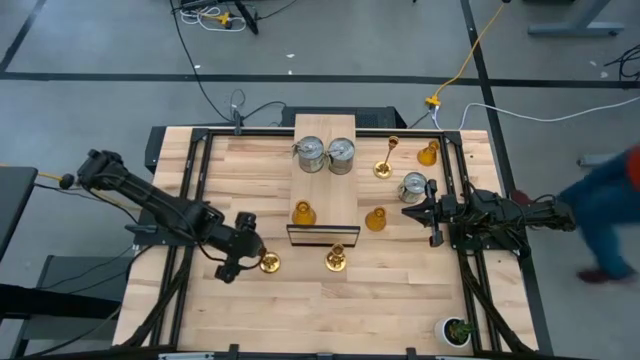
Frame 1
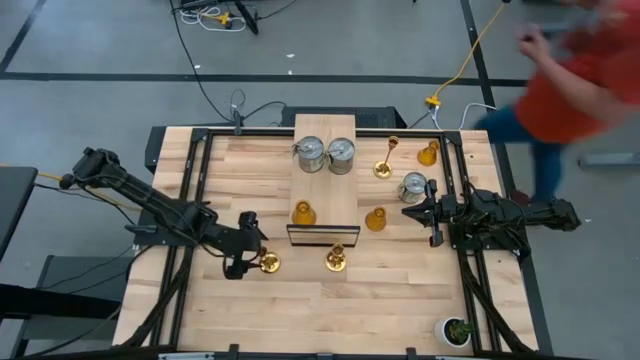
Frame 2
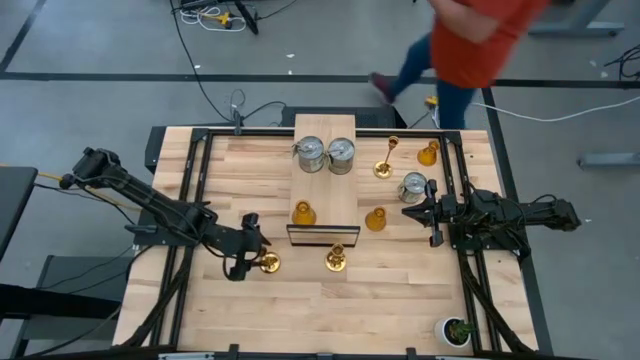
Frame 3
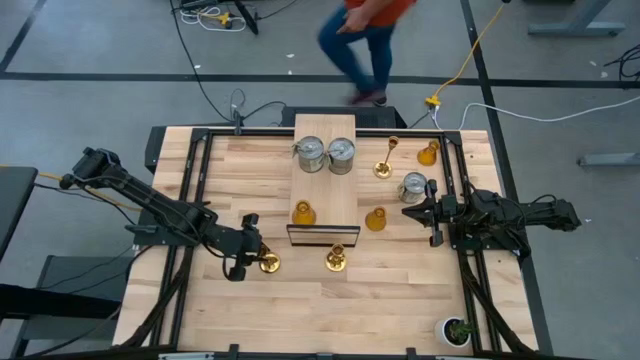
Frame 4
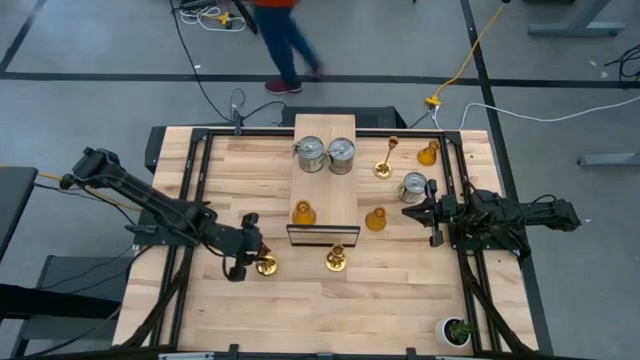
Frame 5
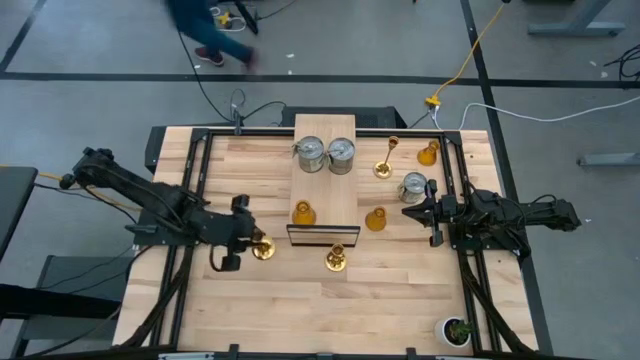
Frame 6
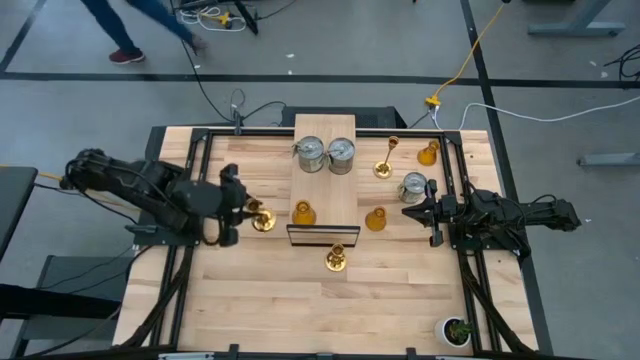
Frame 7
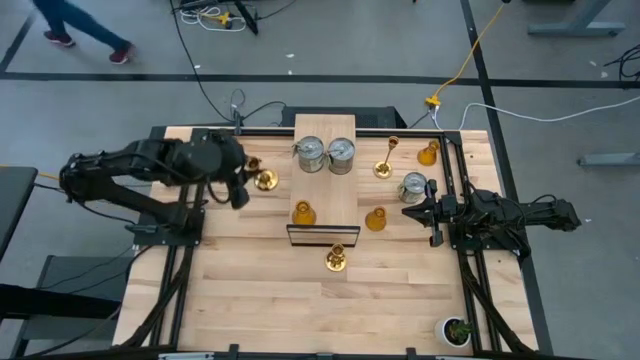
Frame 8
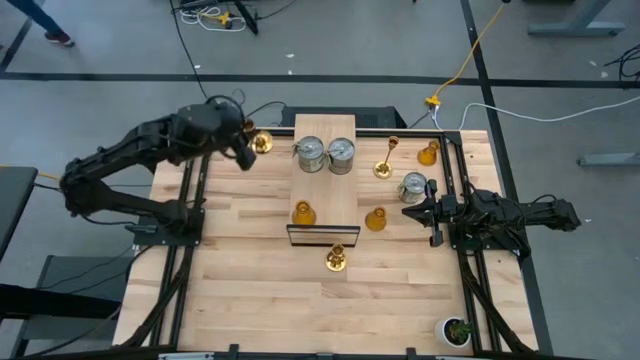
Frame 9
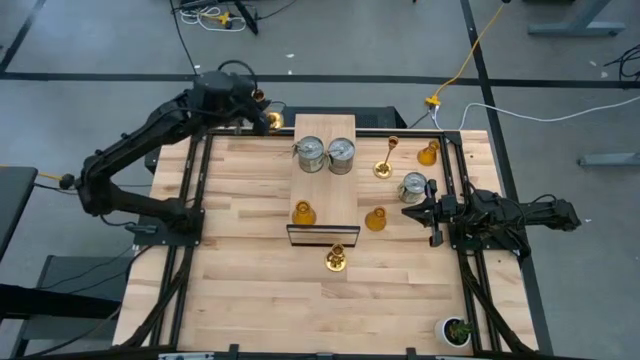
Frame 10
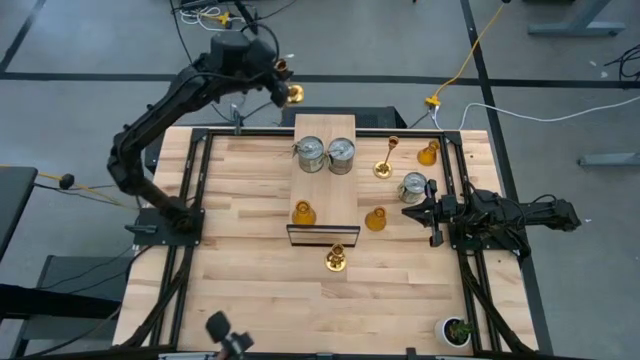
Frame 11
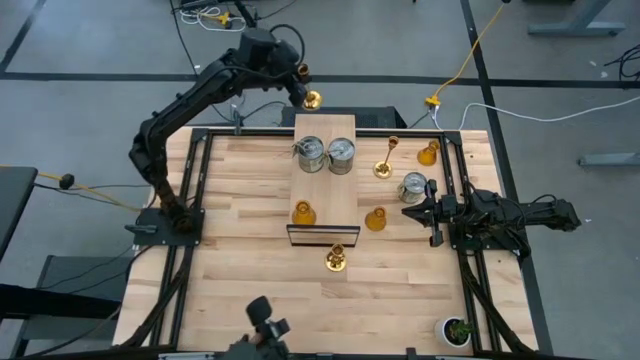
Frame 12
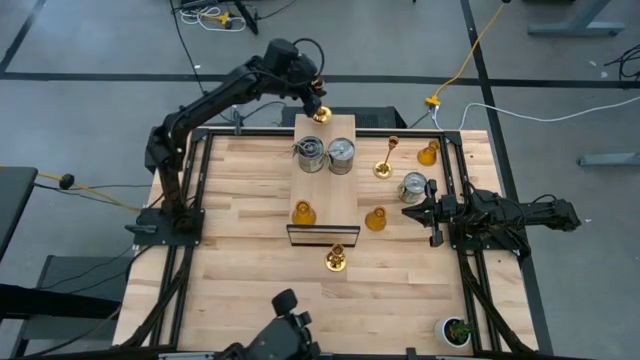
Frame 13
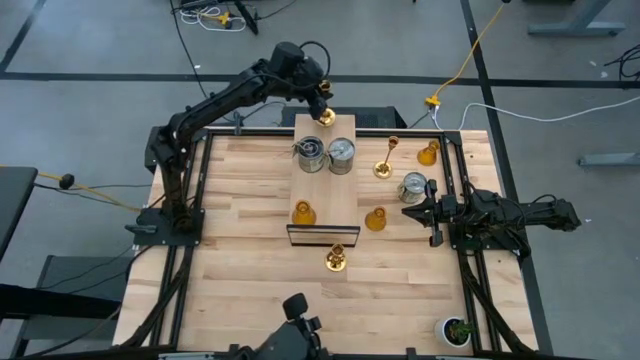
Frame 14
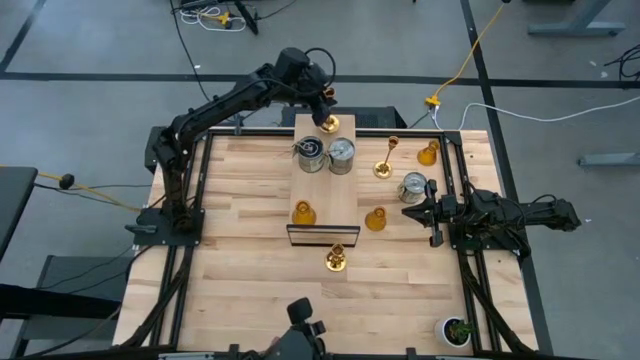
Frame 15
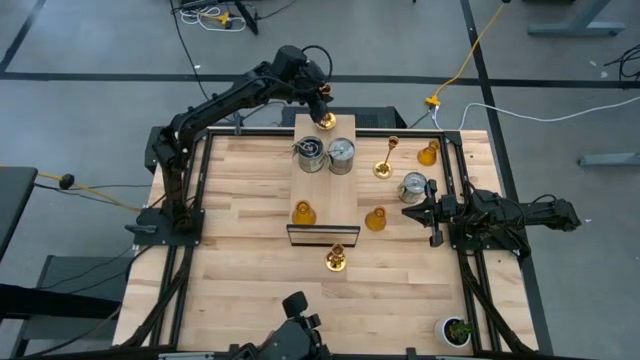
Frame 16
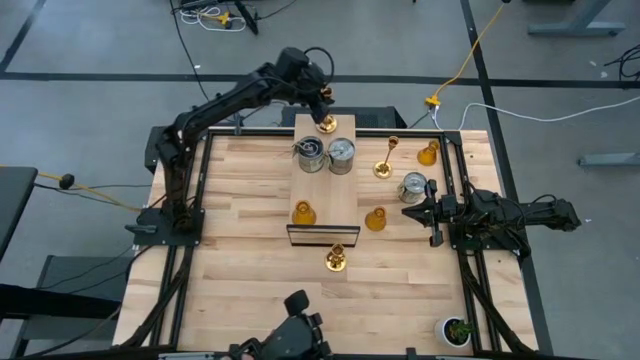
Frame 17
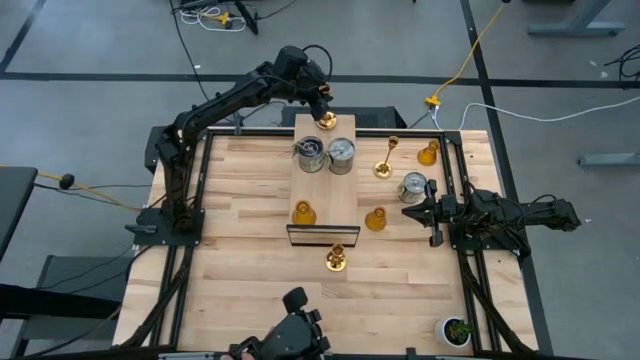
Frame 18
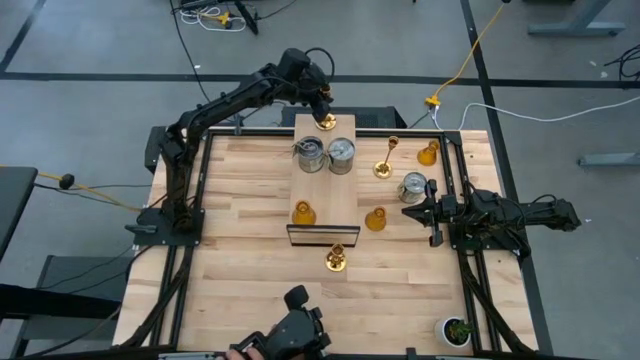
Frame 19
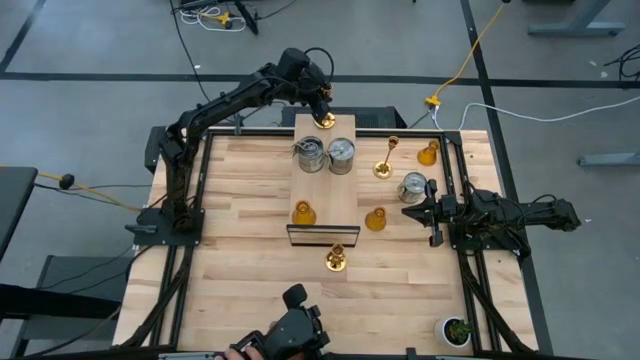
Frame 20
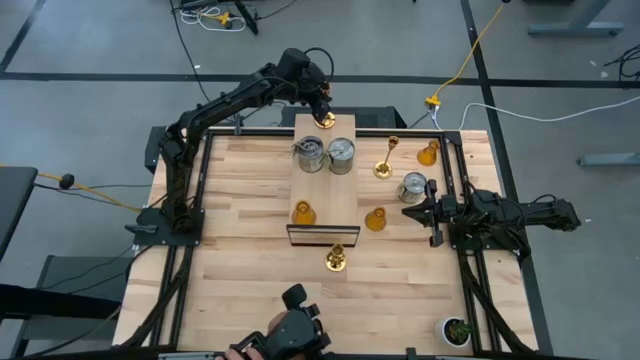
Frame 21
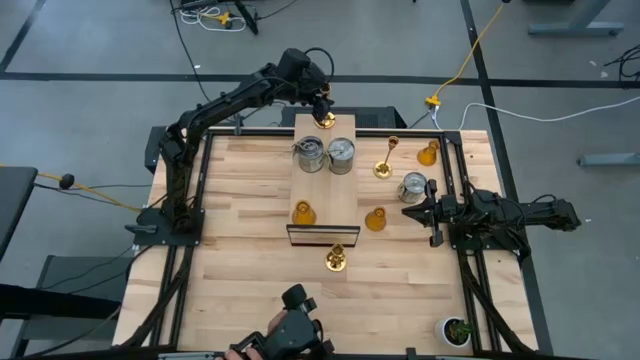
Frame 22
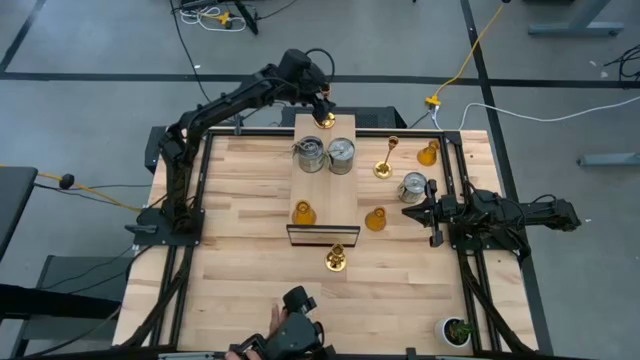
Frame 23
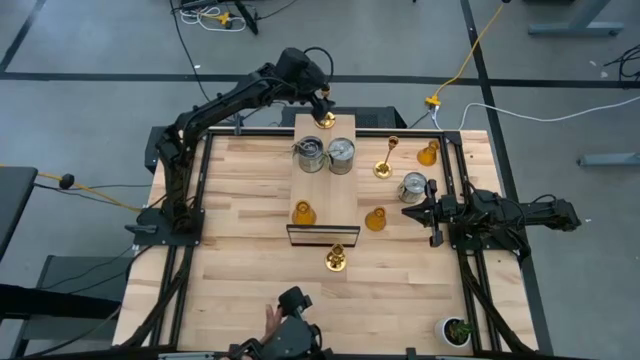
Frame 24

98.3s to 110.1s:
Task: Pick & Place candle stick holders
Put the bottom gold scented candle can on the shelf

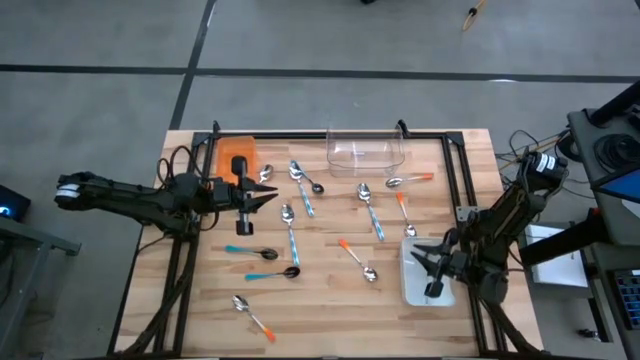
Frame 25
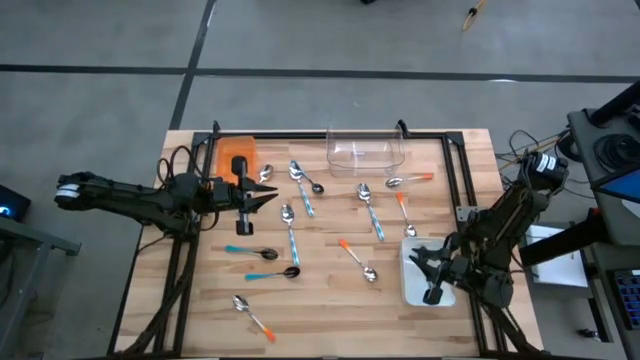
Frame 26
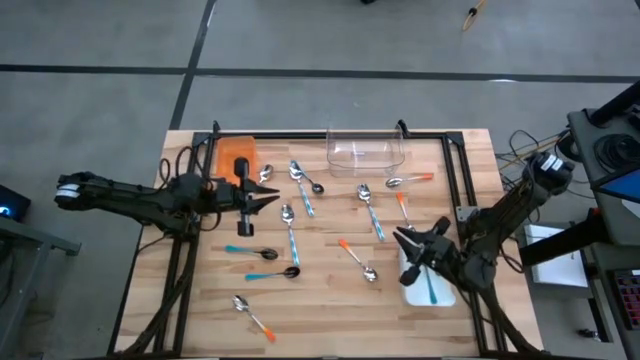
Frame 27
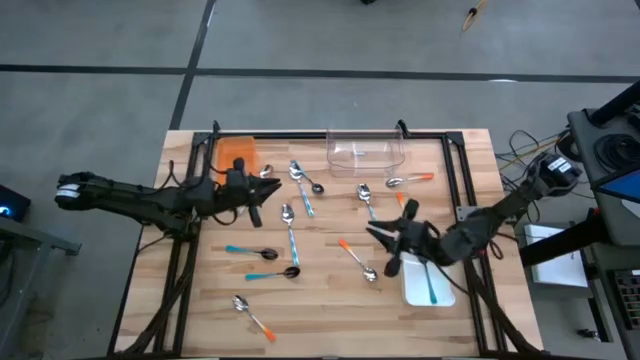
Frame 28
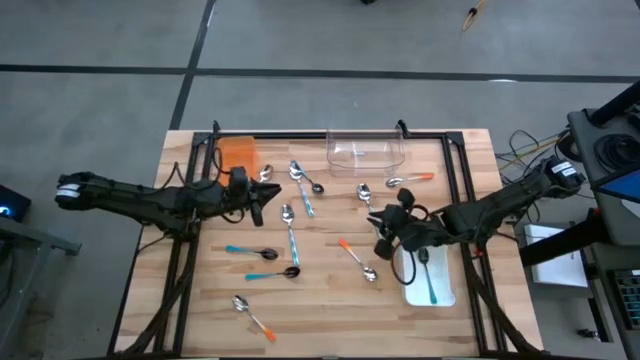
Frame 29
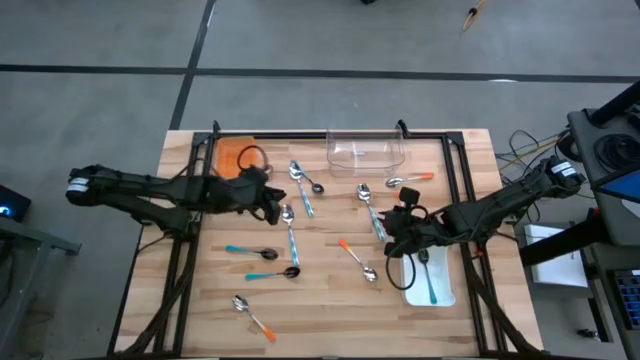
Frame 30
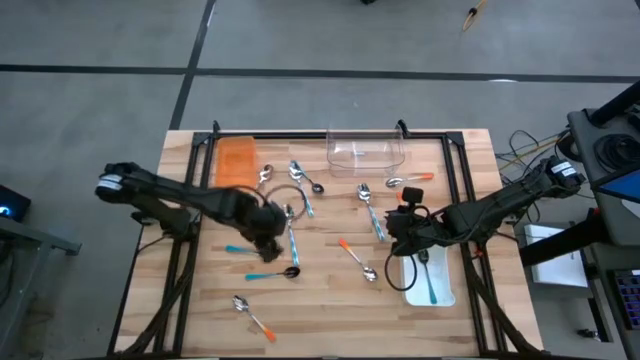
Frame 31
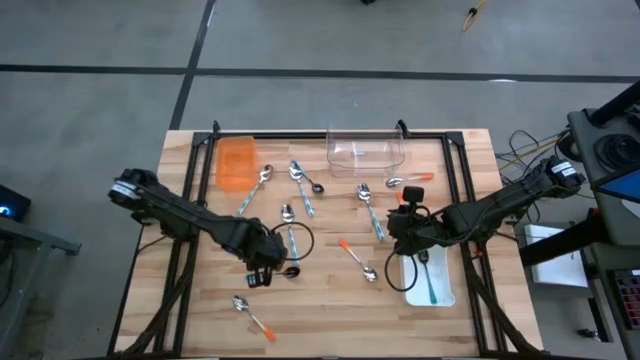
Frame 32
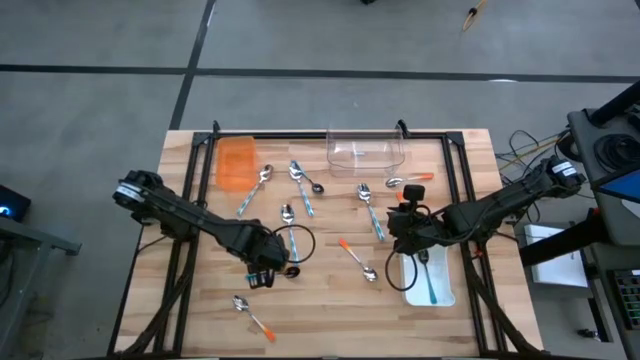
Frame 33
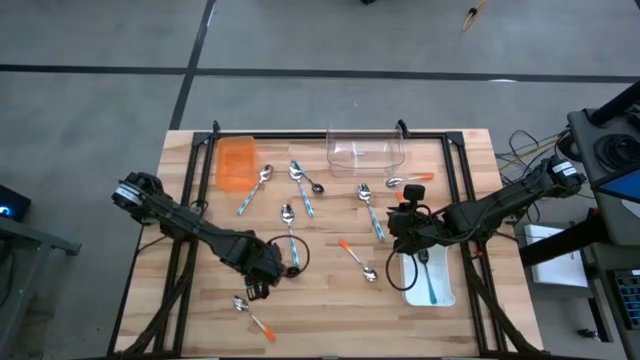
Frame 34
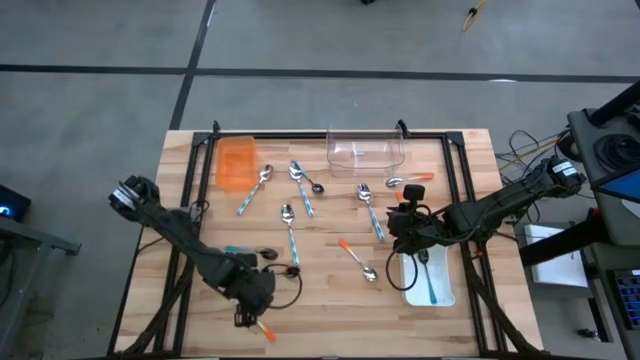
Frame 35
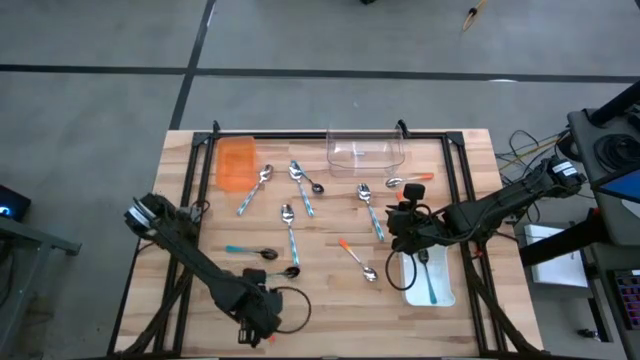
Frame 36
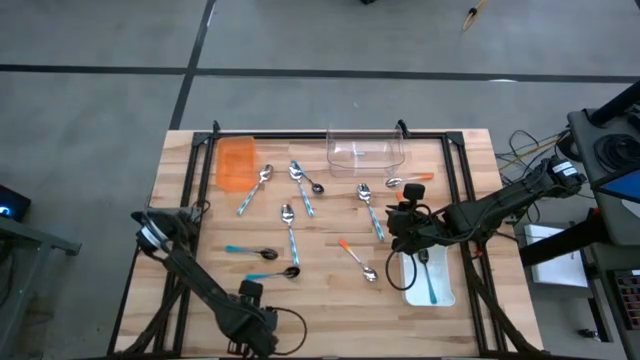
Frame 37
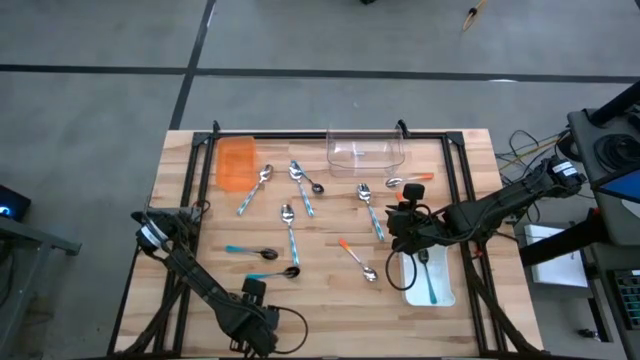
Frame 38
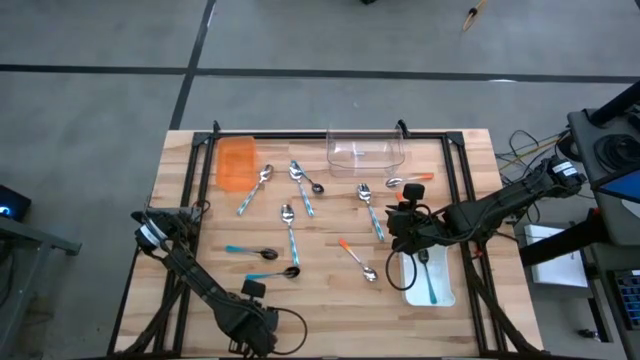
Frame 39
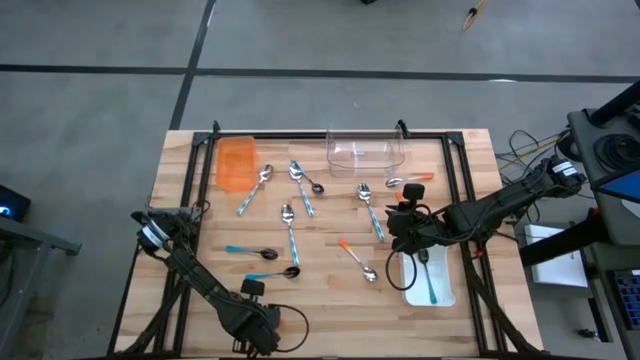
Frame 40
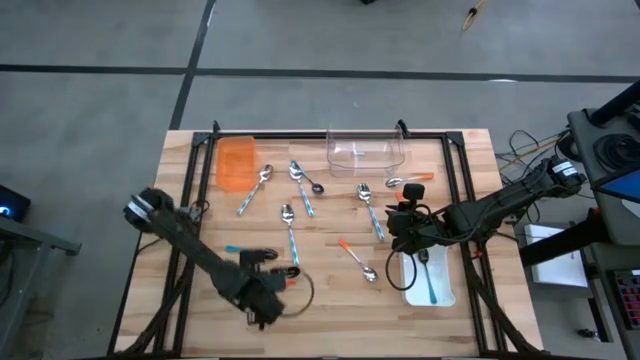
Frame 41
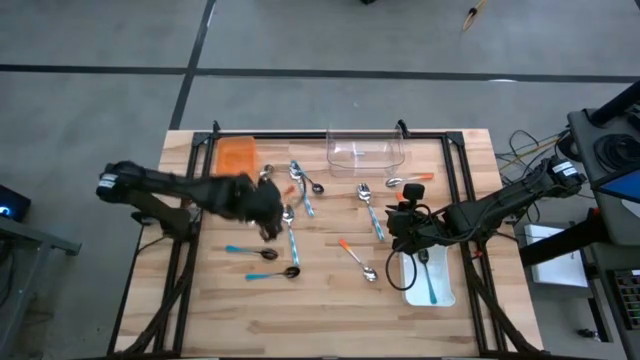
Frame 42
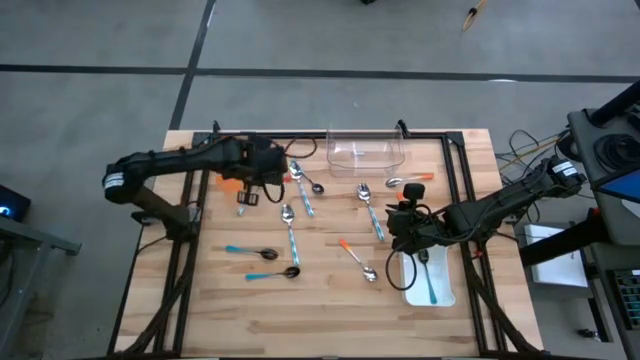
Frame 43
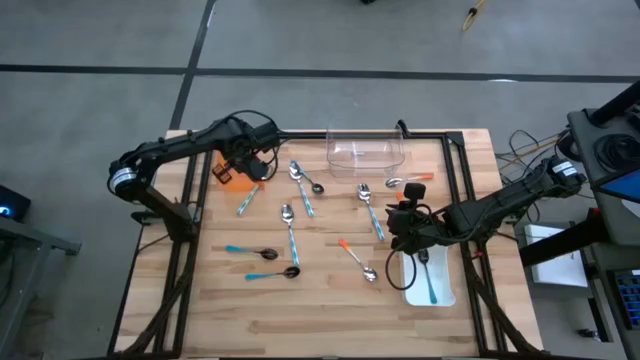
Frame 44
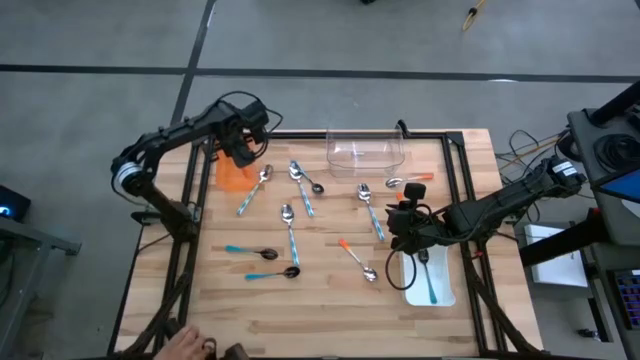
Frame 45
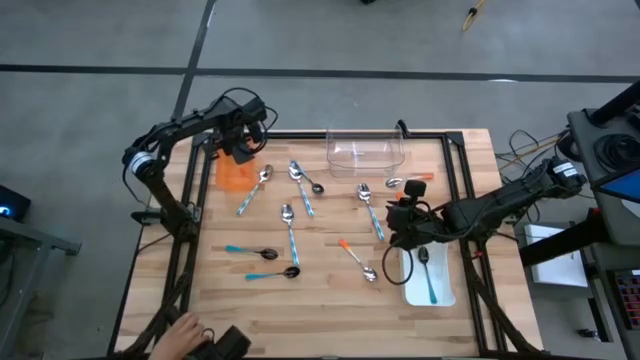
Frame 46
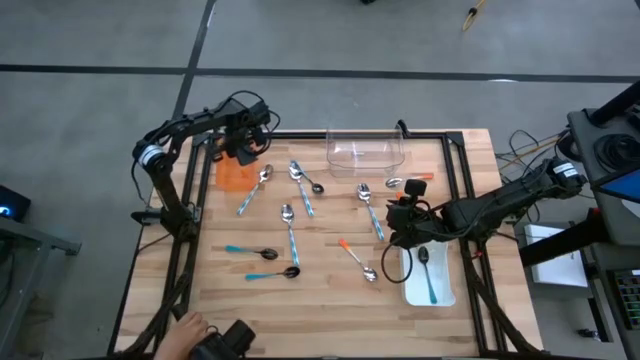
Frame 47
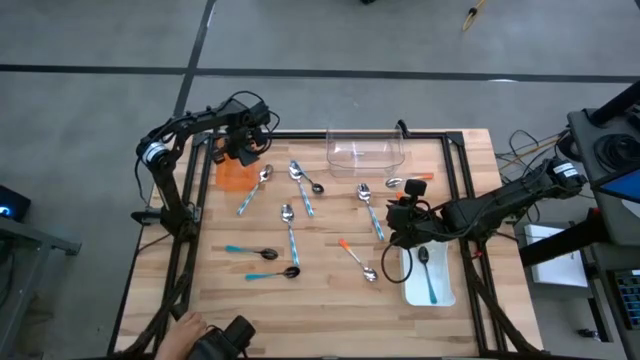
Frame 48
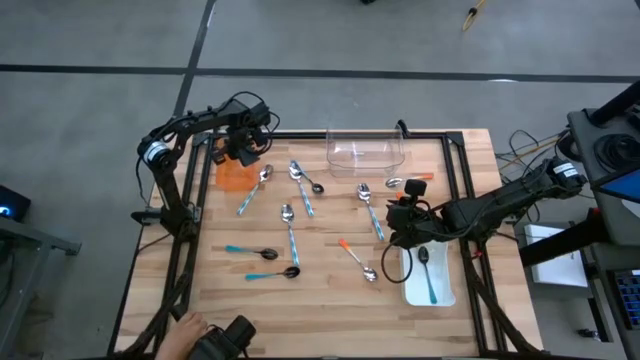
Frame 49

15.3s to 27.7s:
Task: Sort silverware by color (type)
Put the orange spoon into the orange bin
